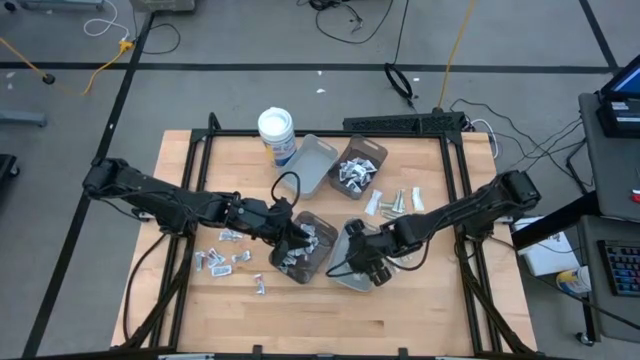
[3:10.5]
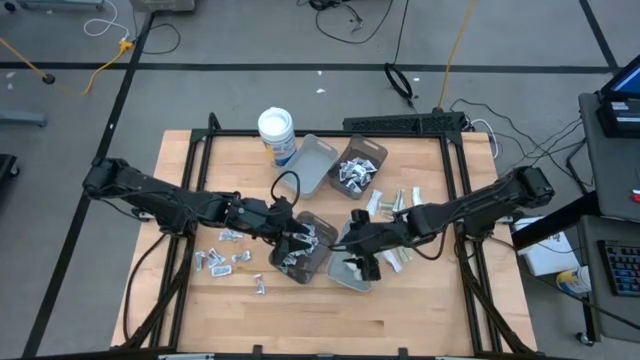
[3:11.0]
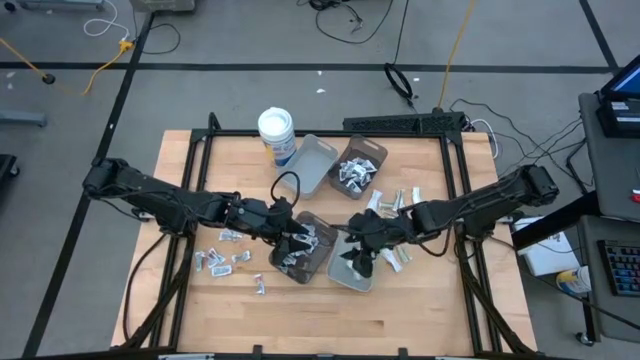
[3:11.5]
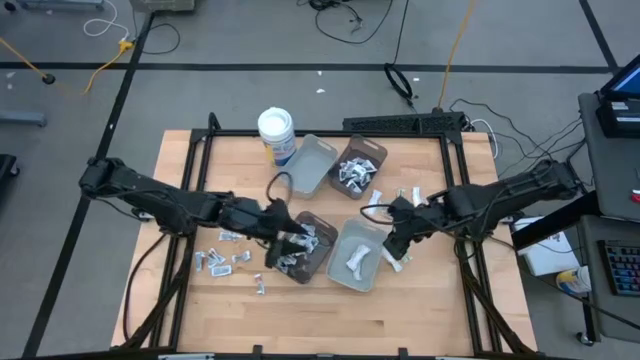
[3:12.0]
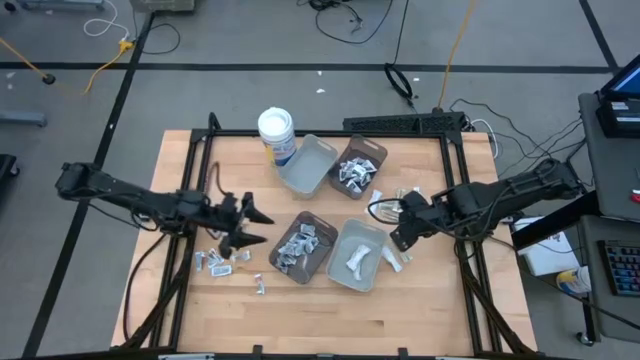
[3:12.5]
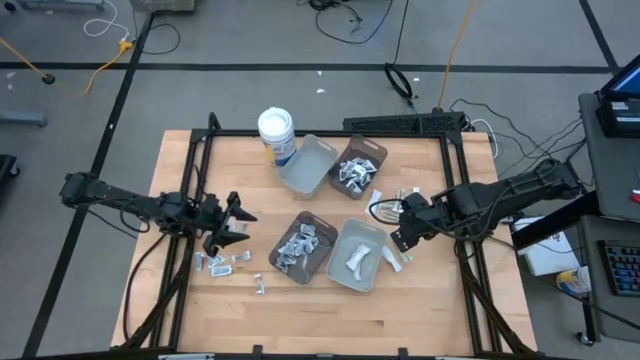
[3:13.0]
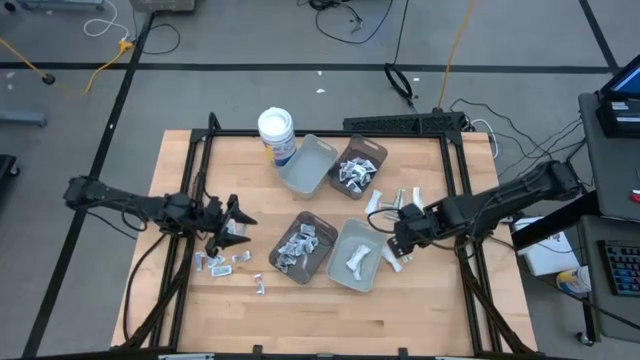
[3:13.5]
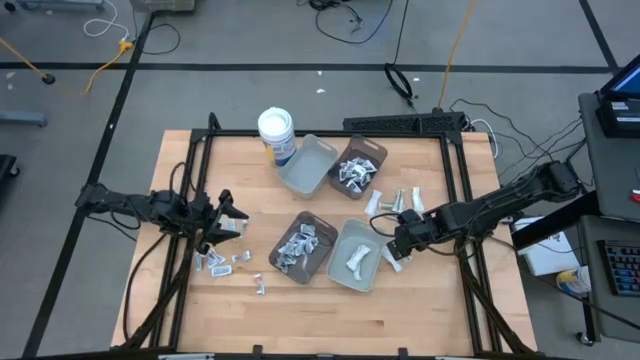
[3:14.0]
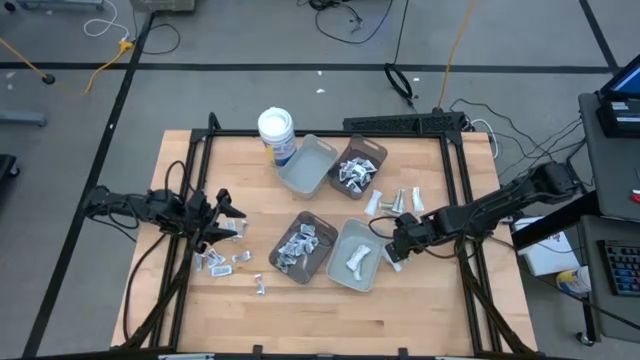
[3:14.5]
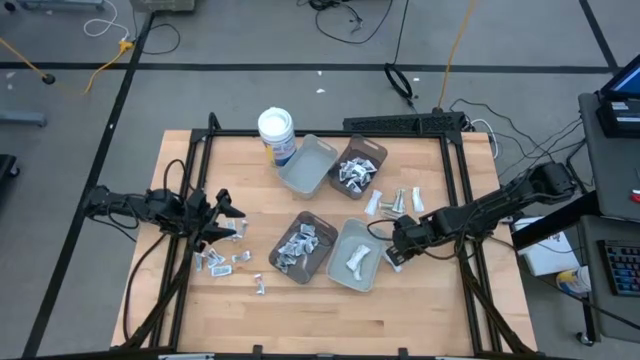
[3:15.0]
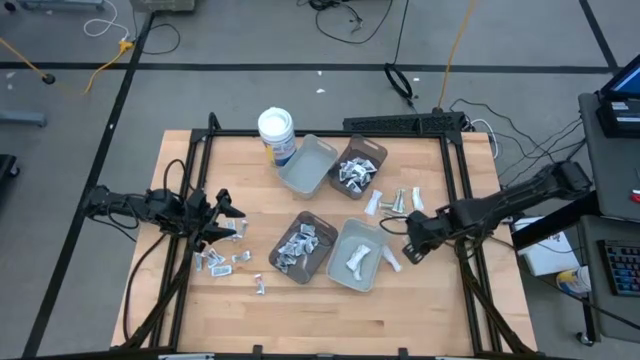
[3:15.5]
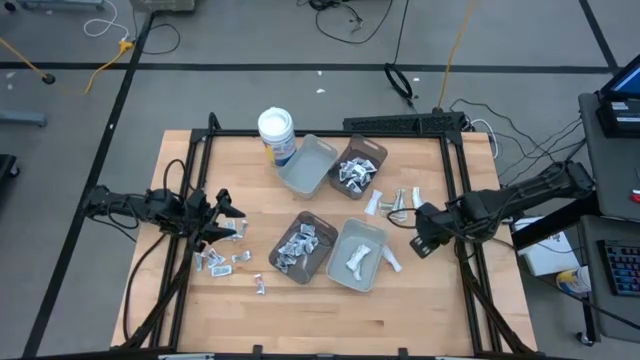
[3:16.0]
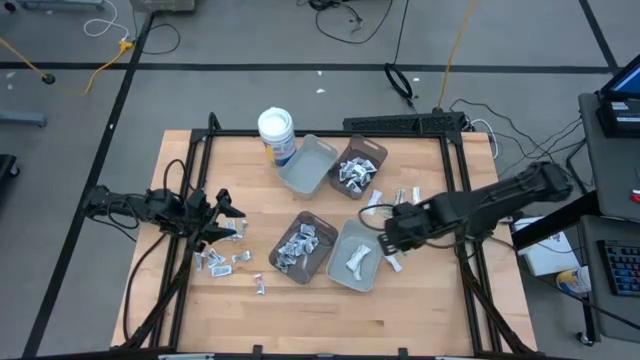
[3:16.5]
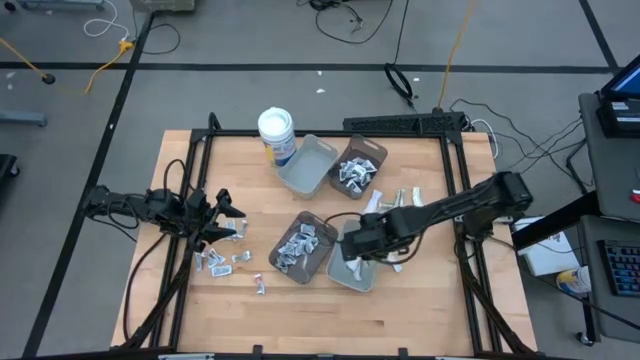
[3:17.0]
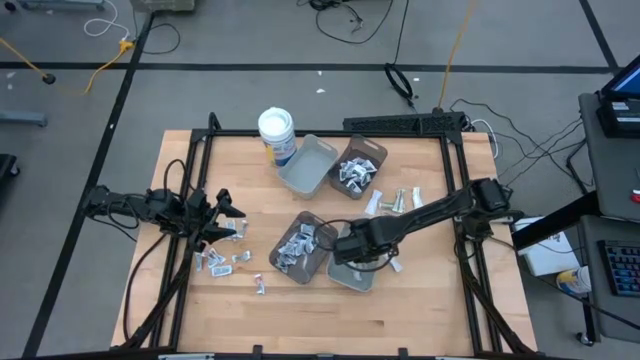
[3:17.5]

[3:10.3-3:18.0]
Task: Pick & Place First Aid Supplies
Put the green bandage into the bottom gray bin

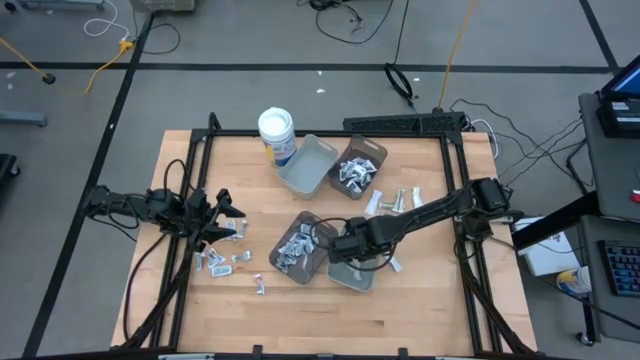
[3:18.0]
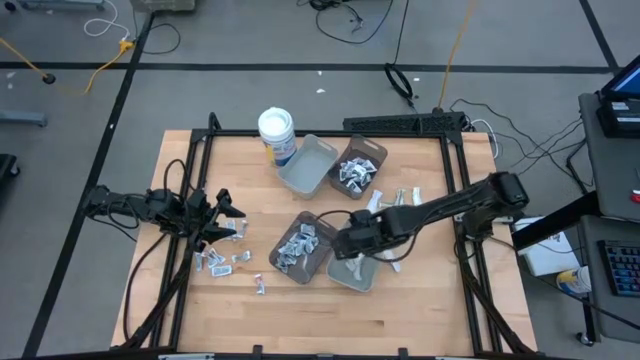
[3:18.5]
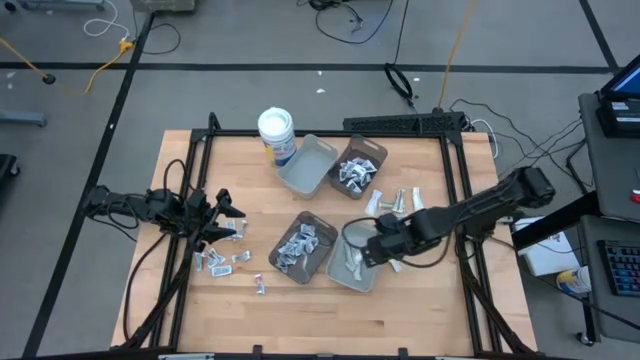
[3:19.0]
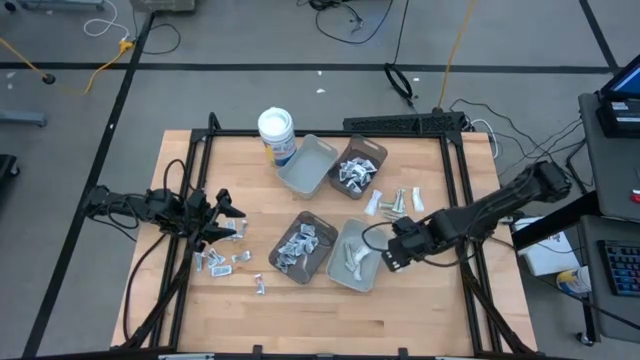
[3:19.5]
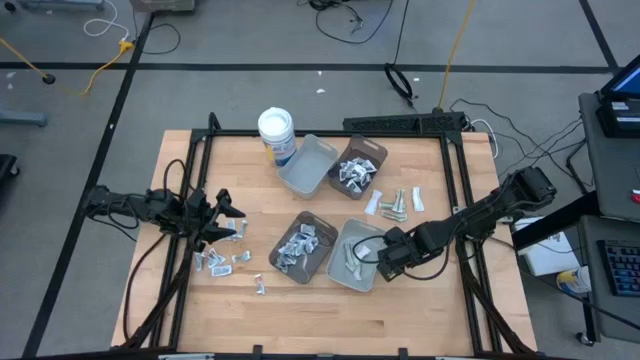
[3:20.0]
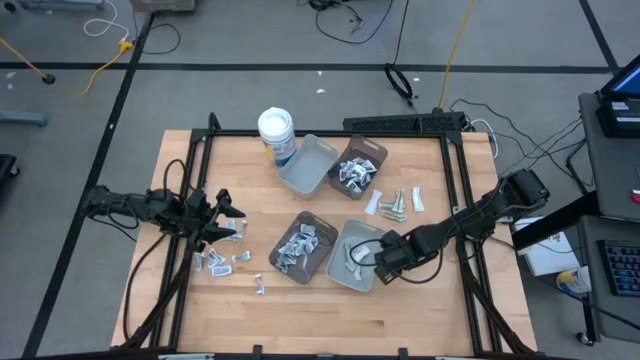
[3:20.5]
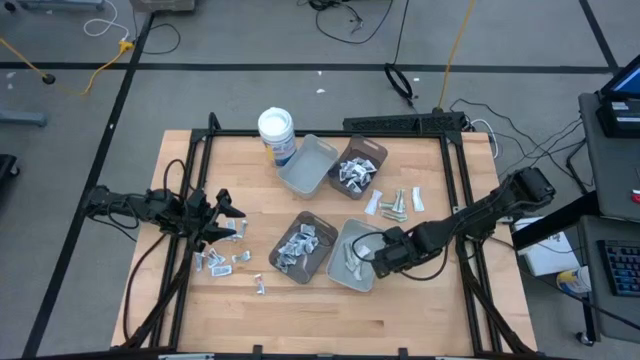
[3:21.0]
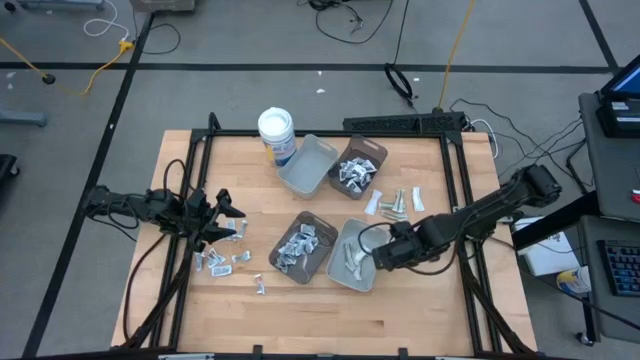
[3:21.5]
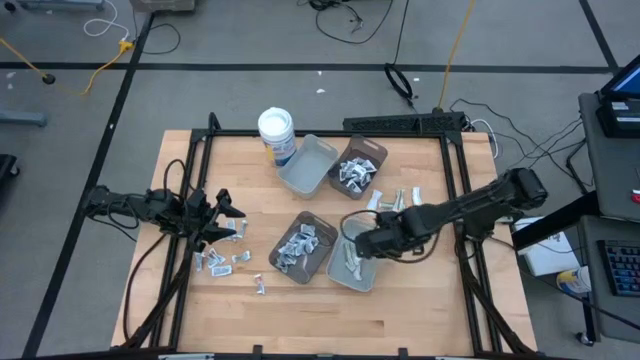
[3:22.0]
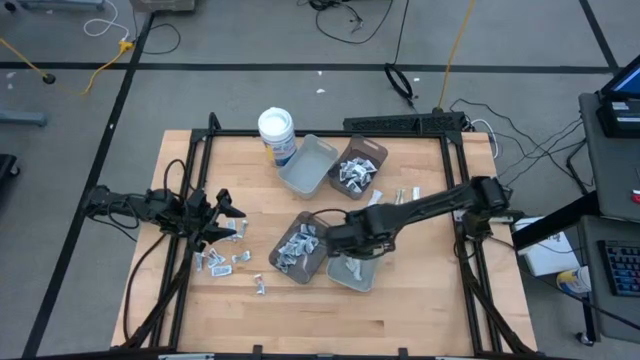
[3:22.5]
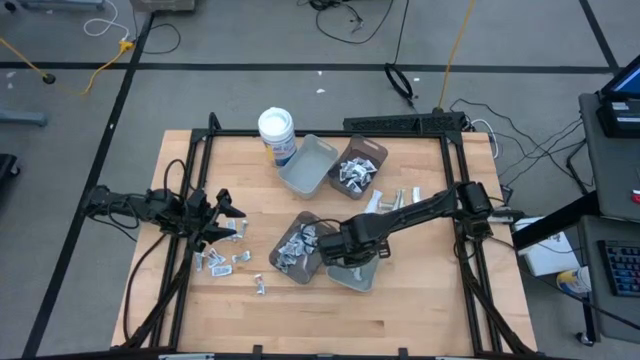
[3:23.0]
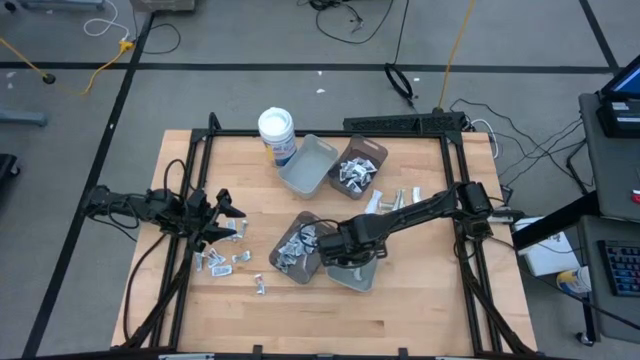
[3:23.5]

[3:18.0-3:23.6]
Put the green bandage into the bottom gray bin

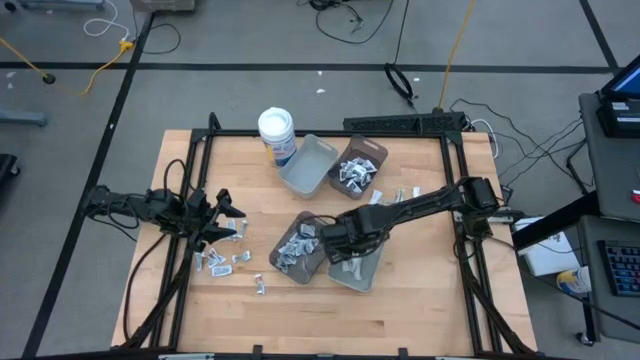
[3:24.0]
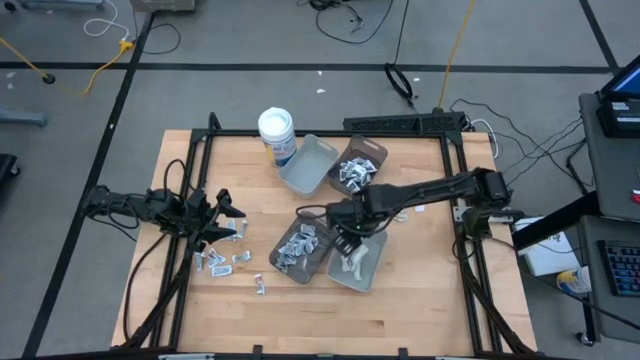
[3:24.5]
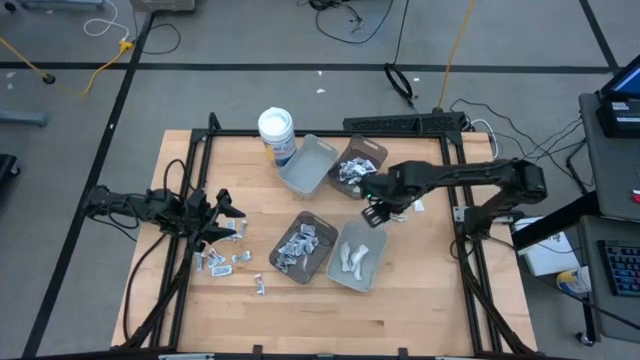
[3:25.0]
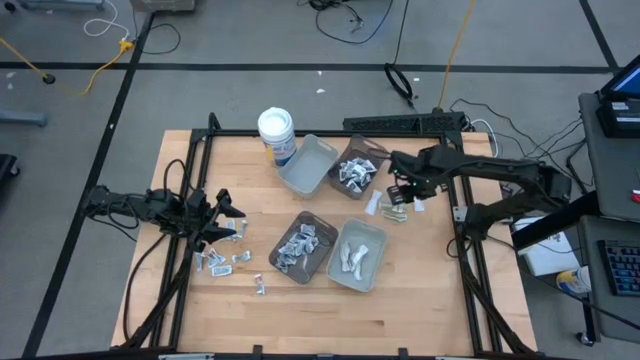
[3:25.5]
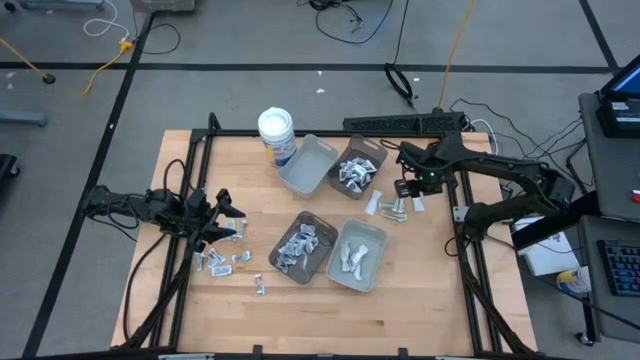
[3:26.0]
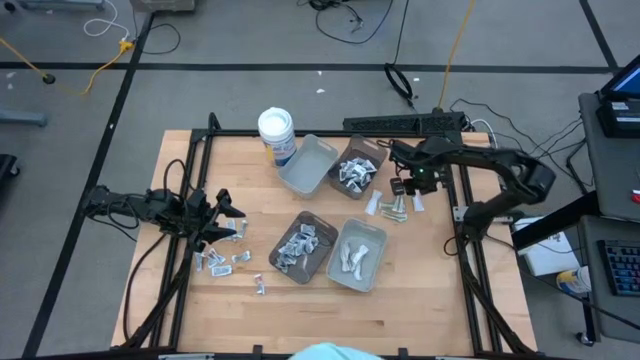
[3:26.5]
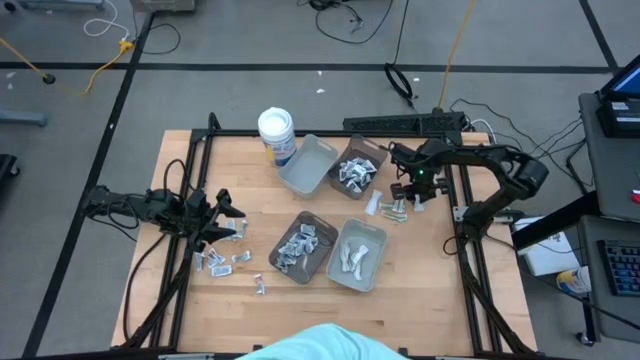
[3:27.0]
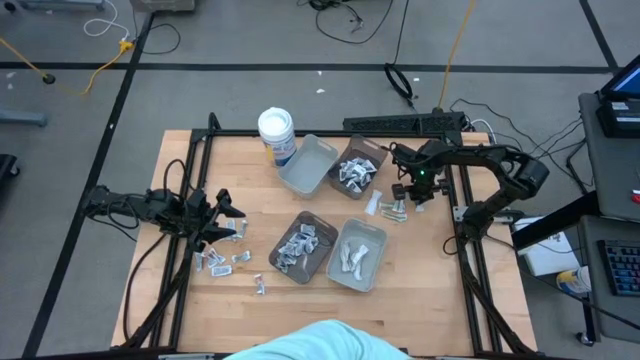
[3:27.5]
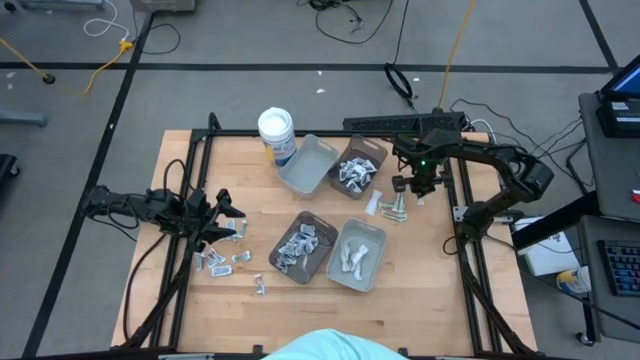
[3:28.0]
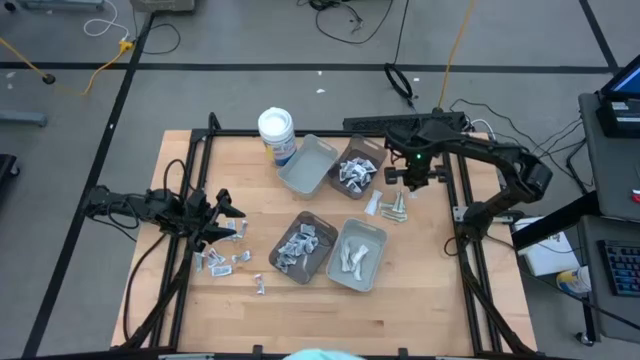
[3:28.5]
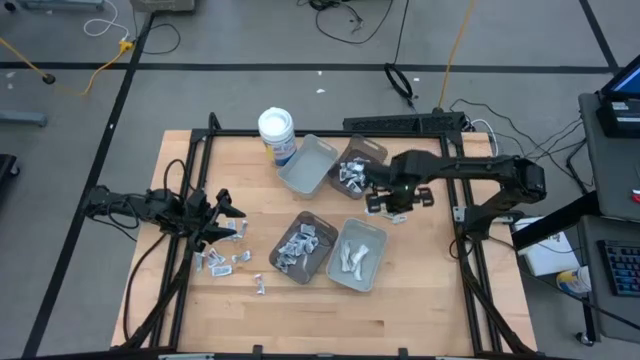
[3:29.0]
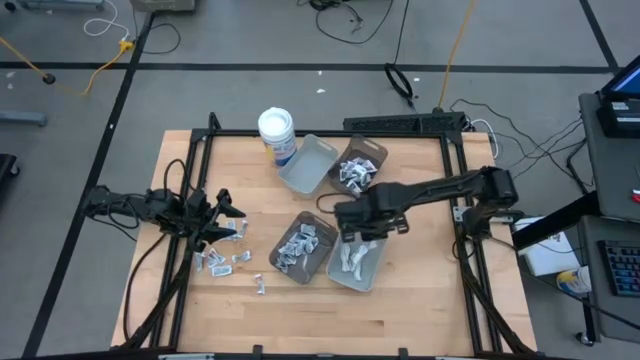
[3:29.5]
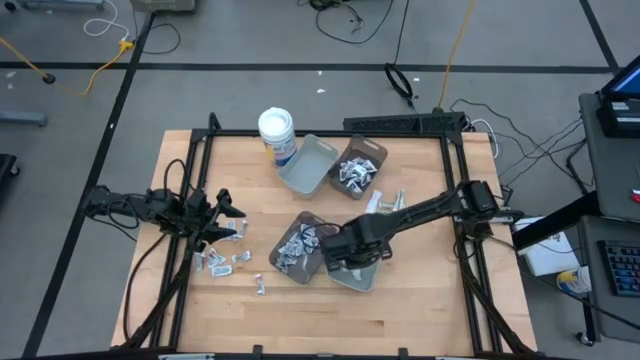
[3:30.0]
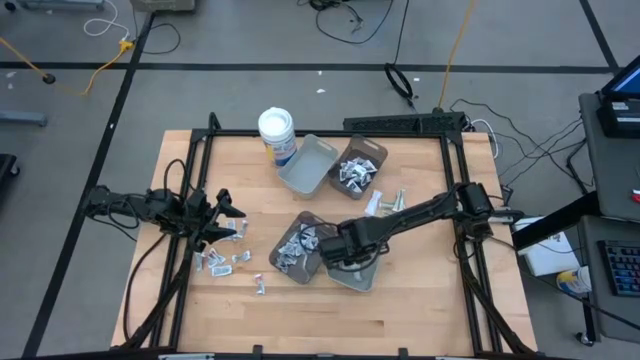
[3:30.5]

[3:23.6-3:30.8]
Put the green bandage into the bottom gray bin

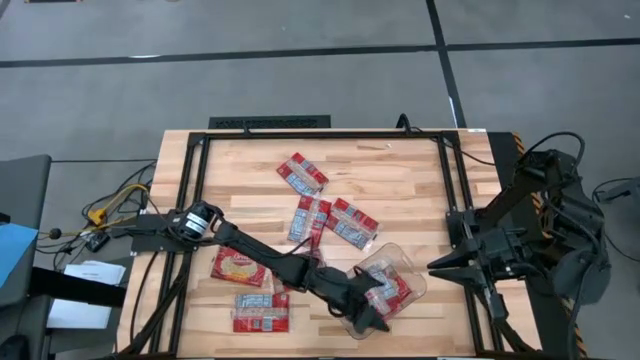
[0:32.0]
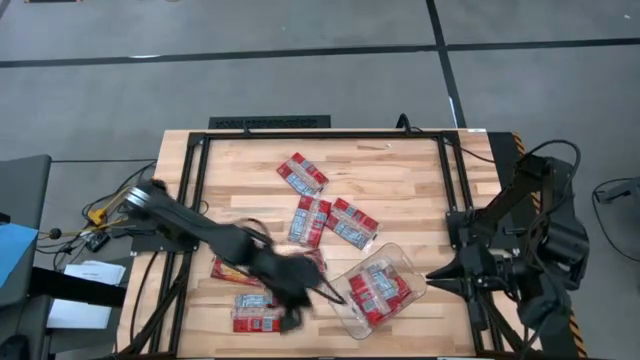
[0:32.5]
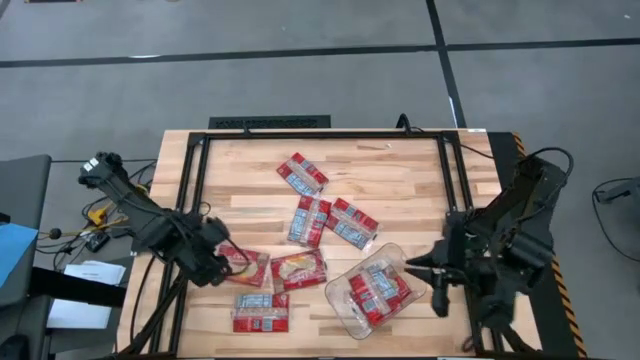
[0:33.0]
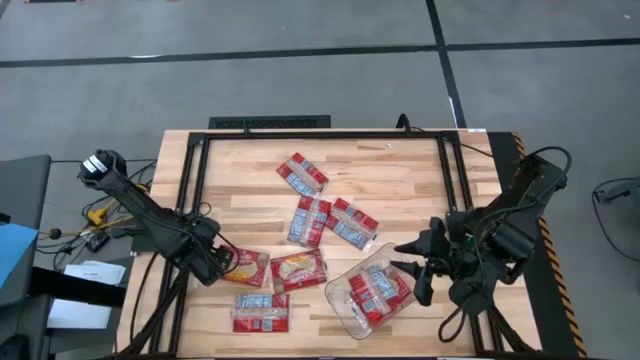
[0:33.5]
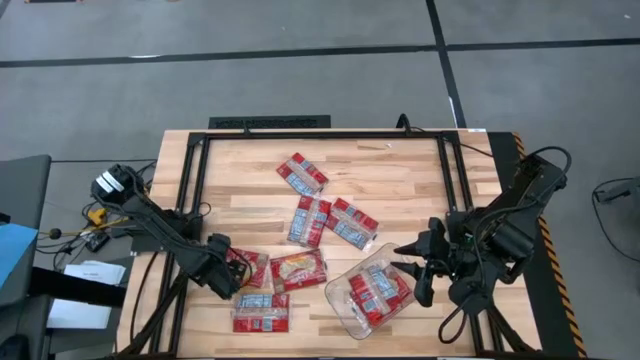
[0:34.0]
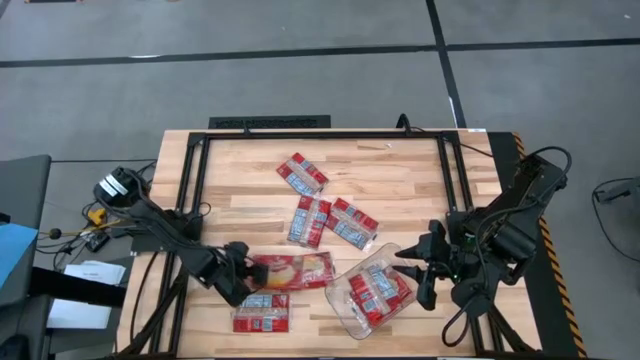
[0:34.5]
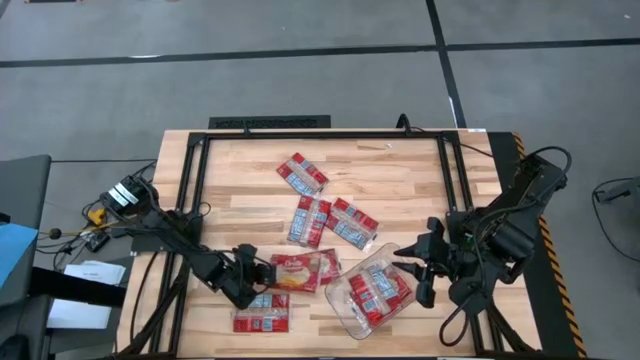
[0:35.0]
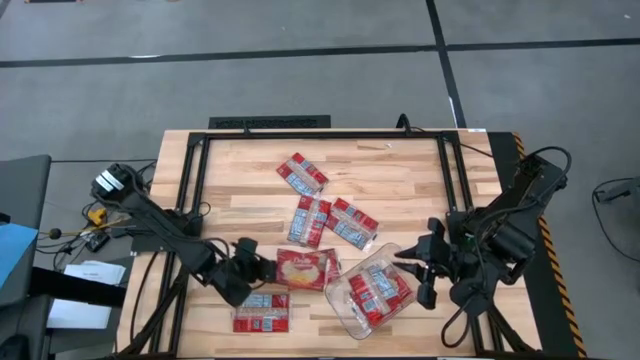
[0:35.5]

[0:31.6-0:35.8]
Task: Sort popcorn bags into baskets
Put the red popcorn bag into the transparent bin
